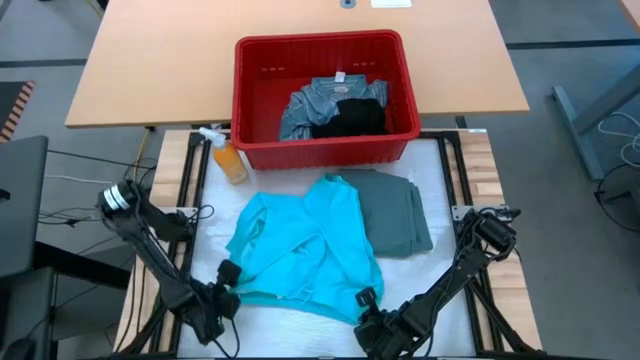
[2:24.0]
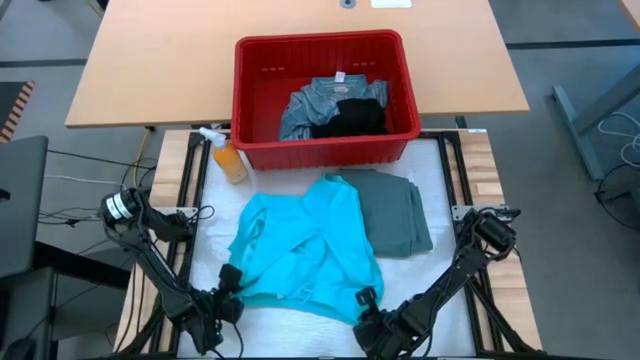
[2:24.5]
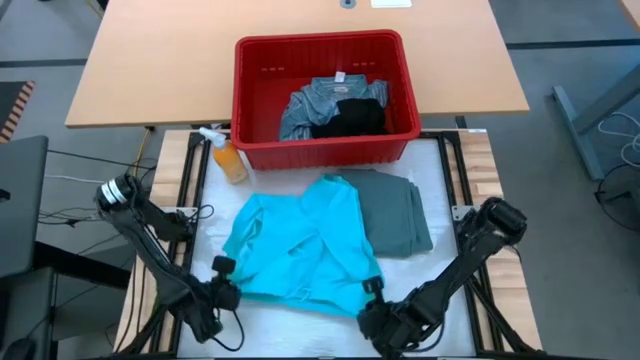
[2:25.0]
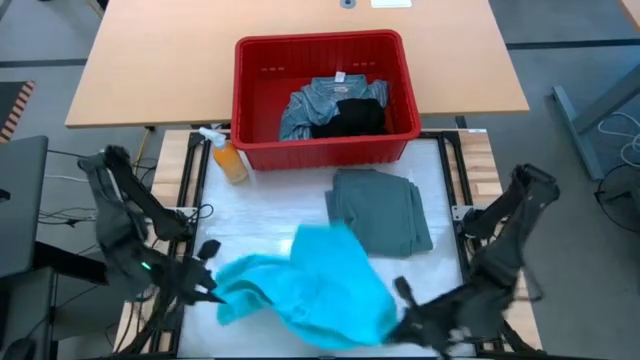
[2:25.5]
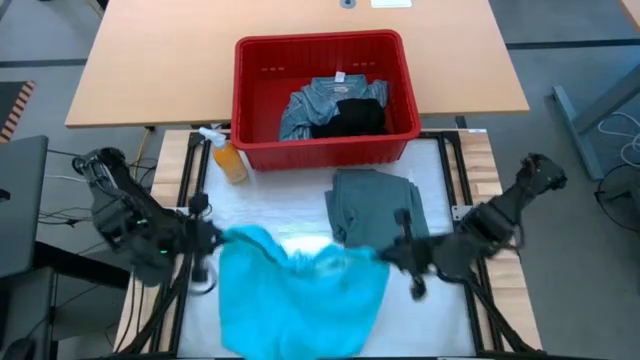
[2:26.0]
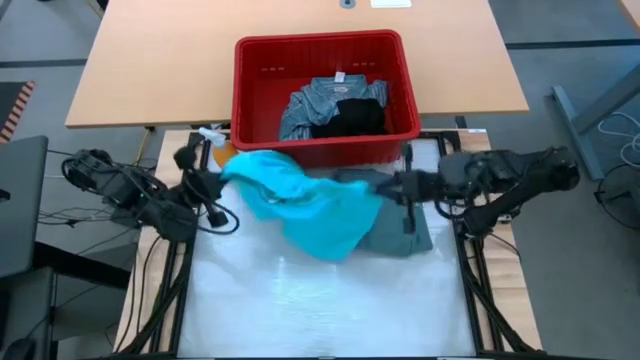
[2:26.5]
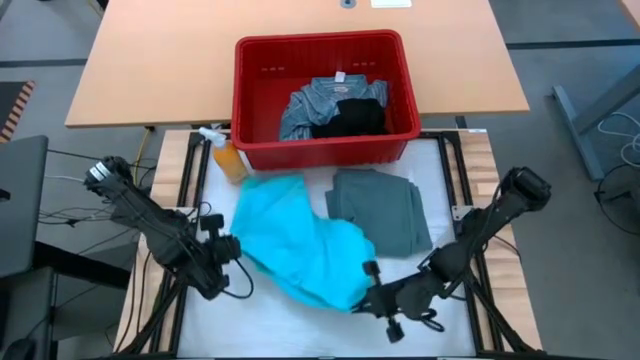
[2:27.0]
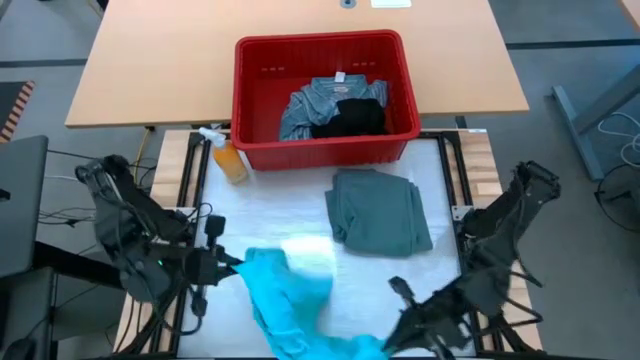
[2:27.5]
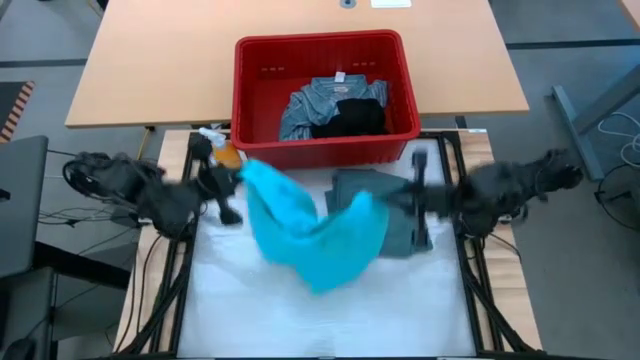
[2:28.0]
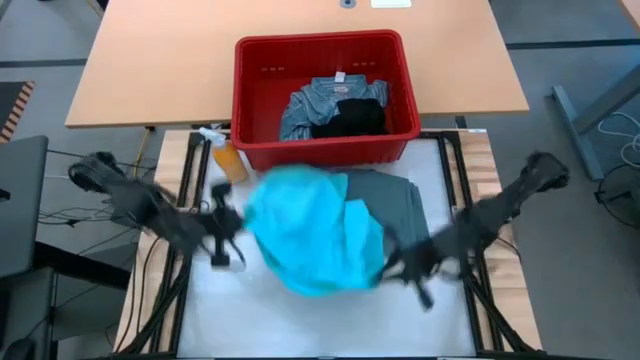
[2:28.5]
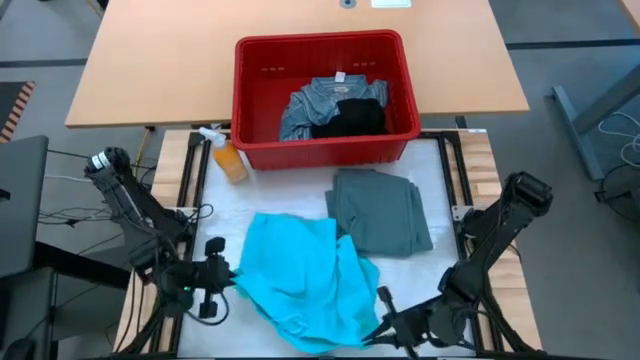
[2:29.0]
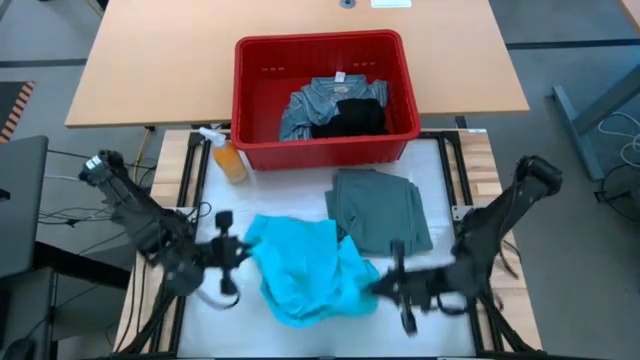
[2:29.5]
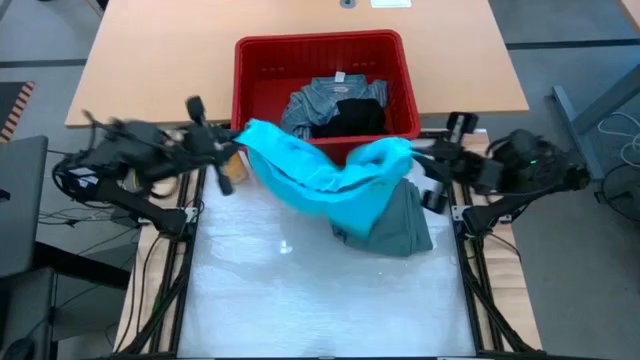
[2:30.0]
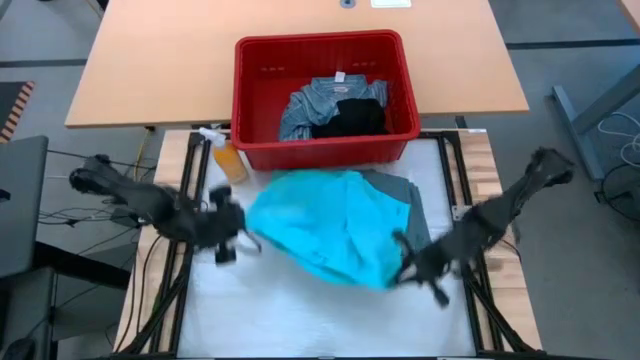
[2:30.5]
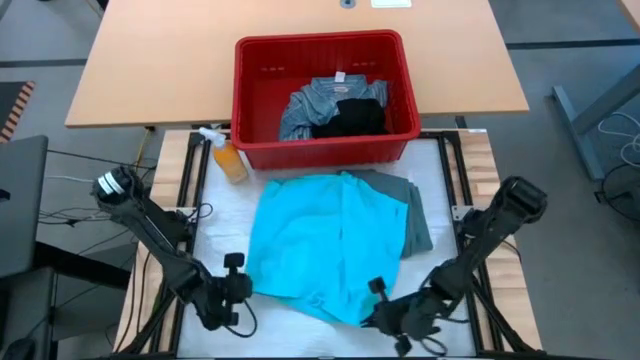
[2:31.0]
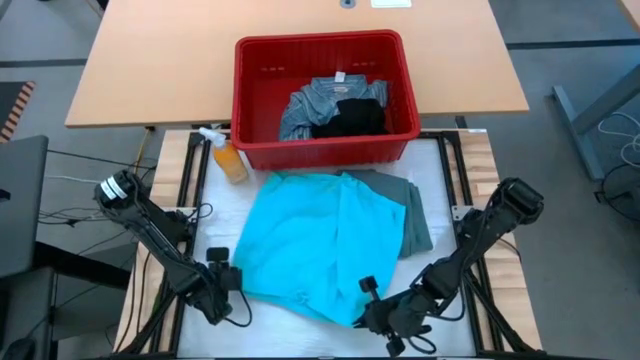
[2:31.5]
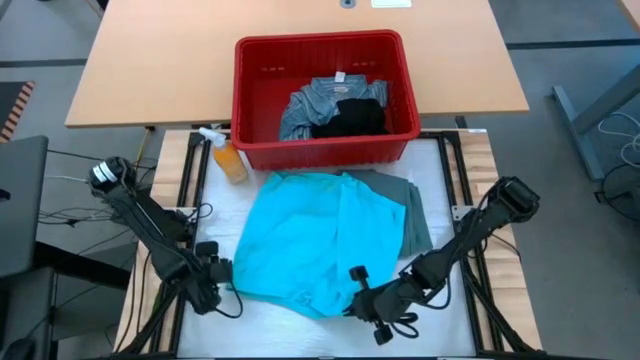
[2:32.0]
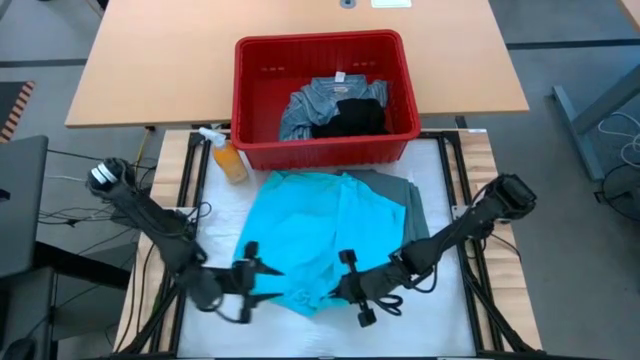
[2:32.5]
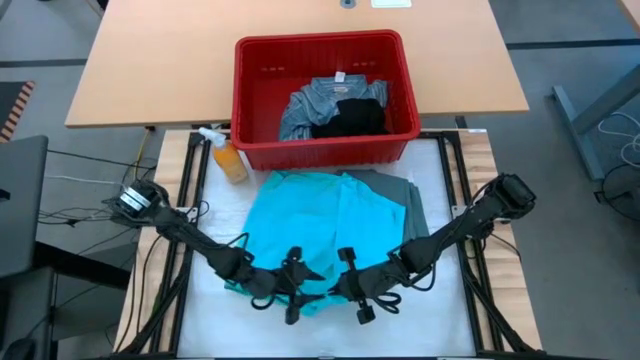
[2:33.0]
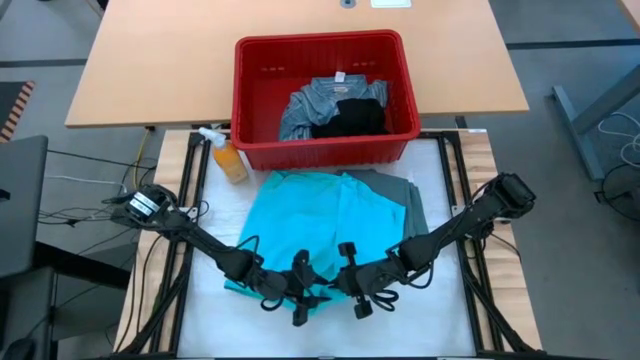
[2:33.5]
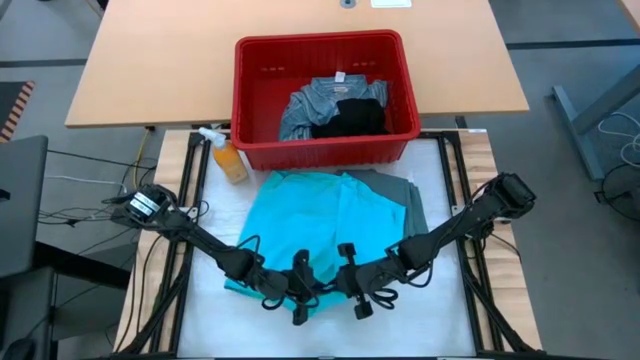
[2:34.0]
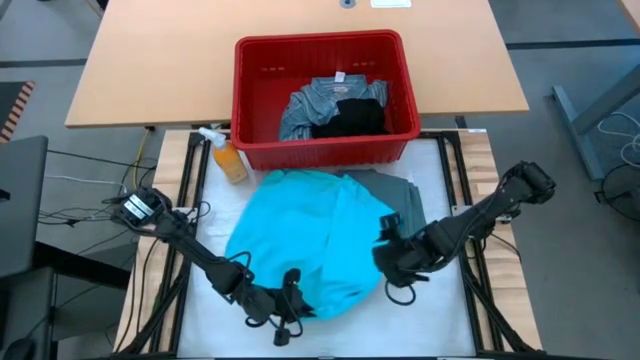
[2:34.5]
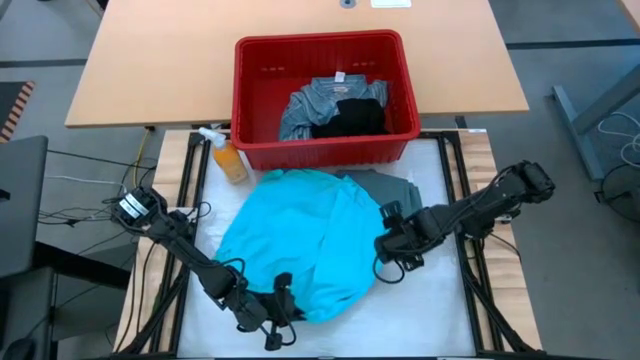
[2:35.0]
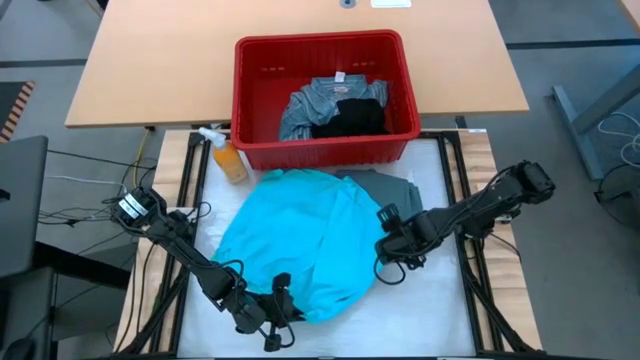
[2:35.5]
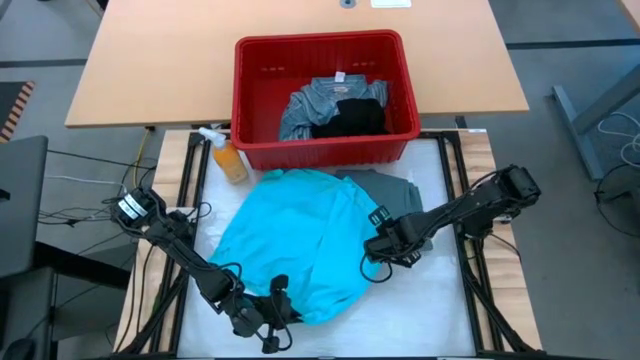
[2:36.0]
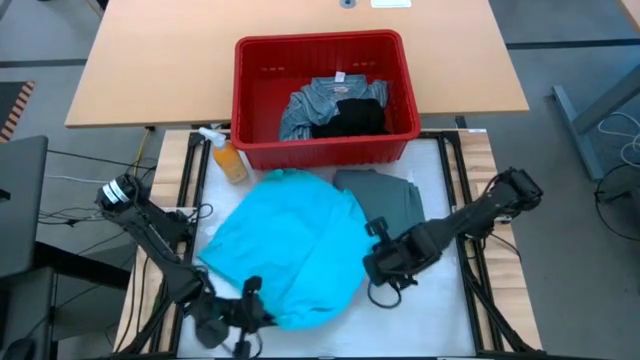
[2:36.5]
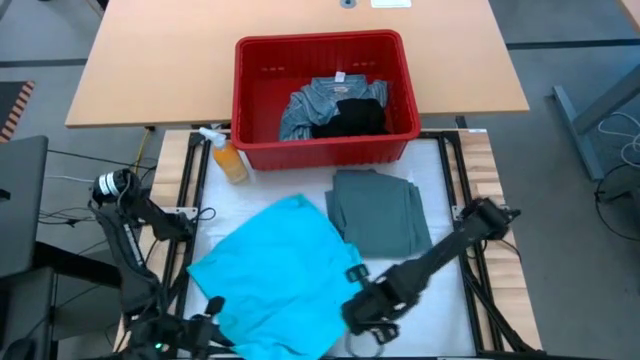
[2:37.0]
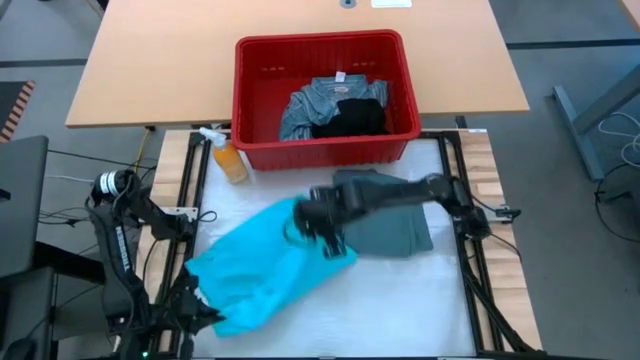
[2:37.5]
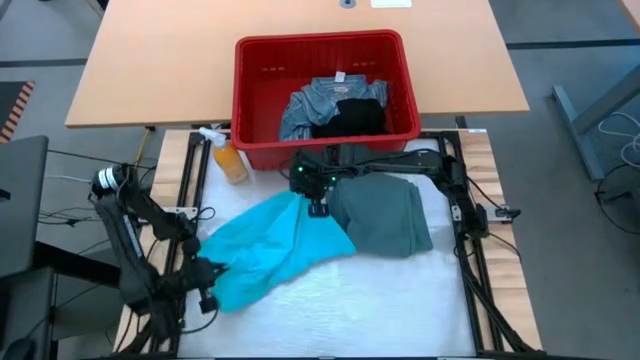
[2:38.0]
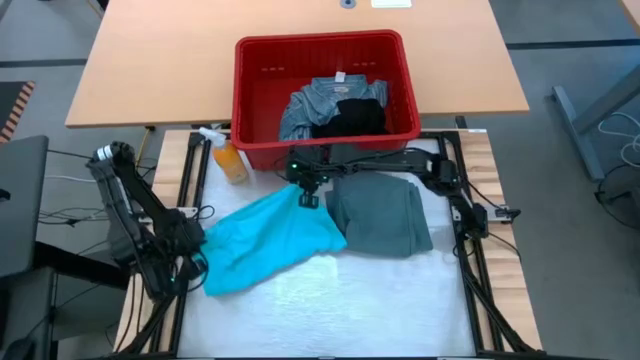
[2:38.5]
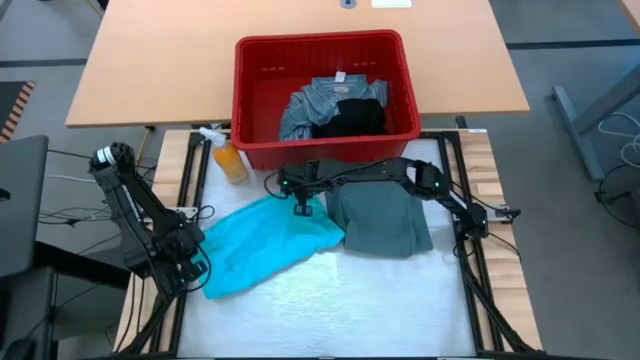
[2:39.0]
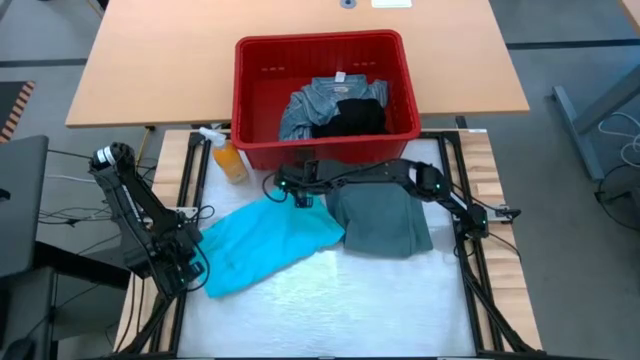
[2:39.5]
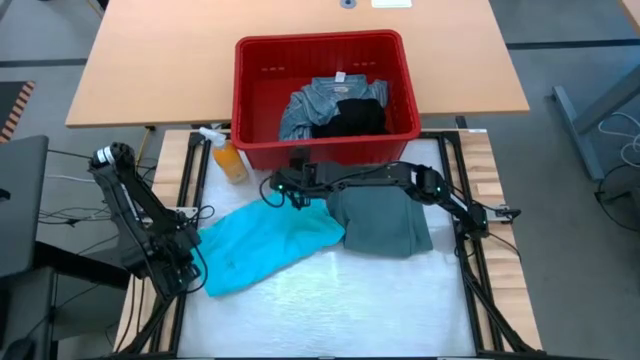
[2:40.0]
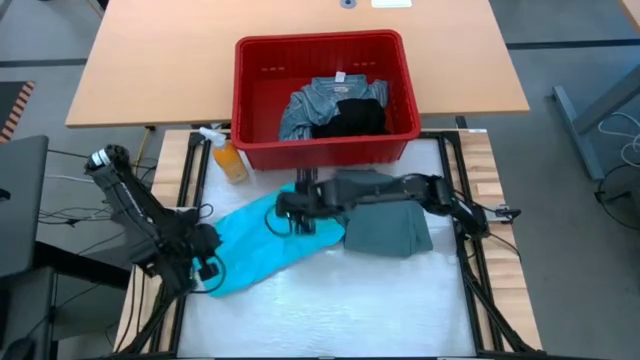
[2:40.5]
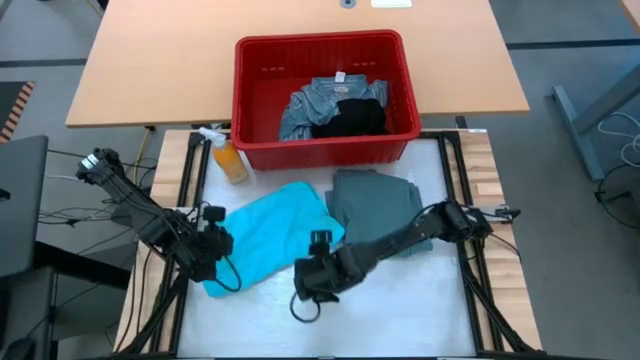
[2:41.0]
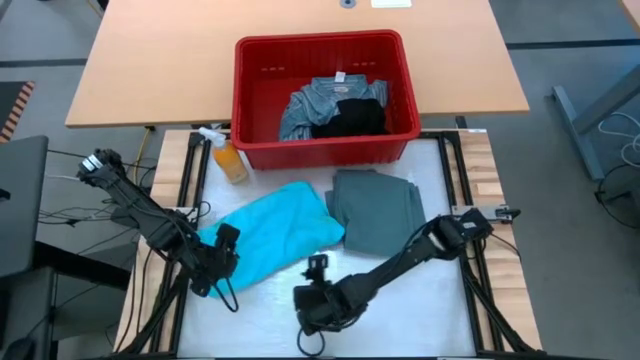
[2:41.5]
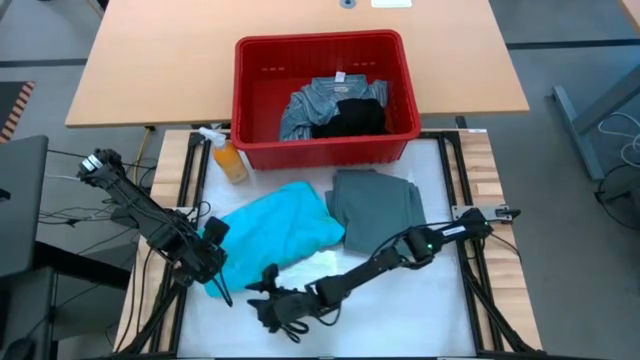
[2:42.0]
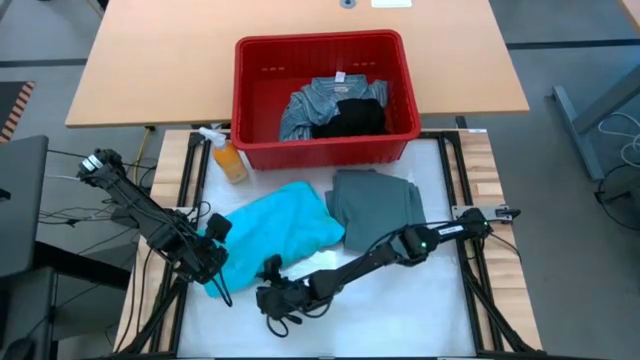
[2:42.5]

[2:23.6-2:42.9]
Task: Fold Laundry from Bin
Fold the light blue shorts

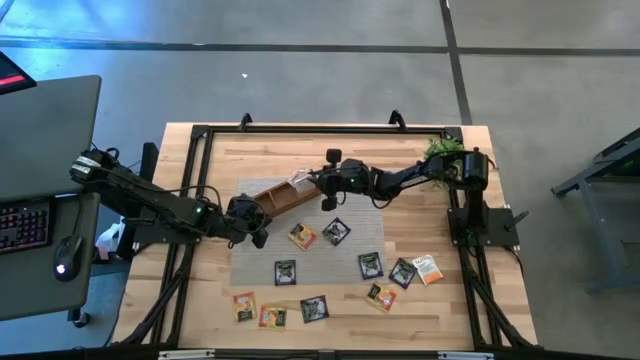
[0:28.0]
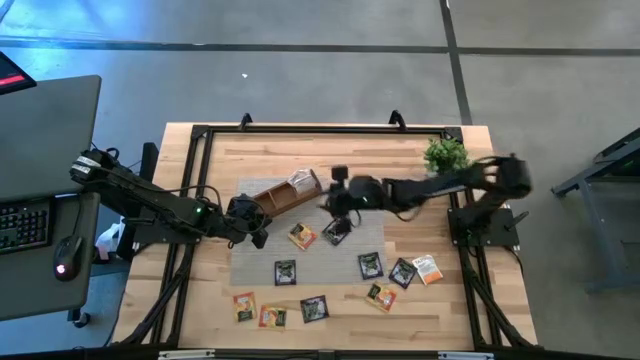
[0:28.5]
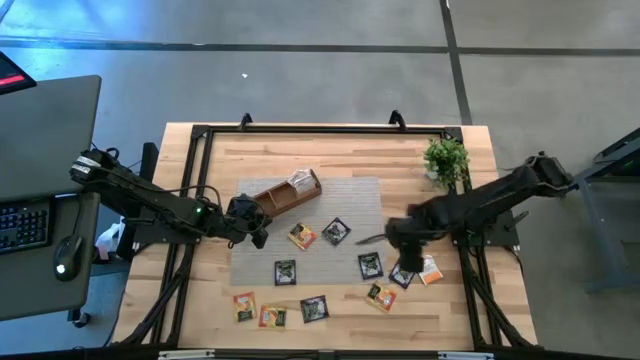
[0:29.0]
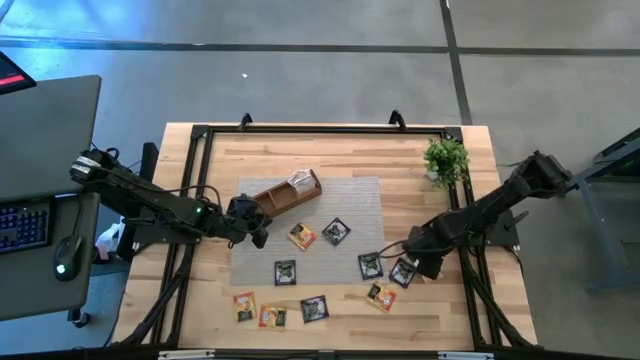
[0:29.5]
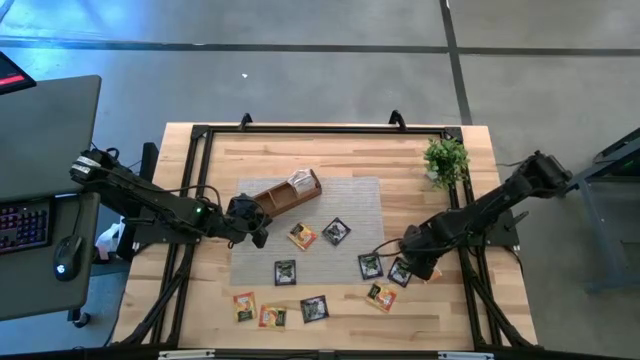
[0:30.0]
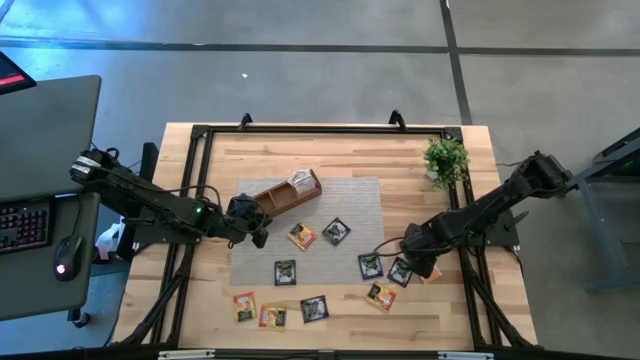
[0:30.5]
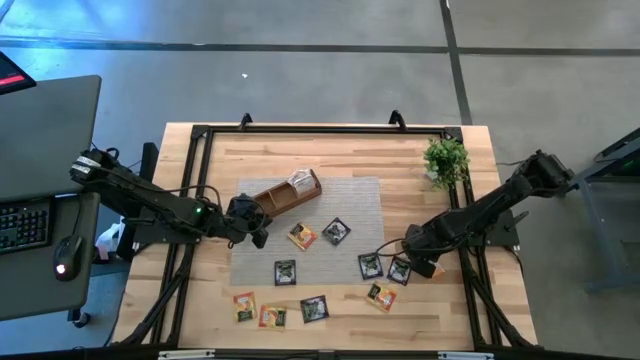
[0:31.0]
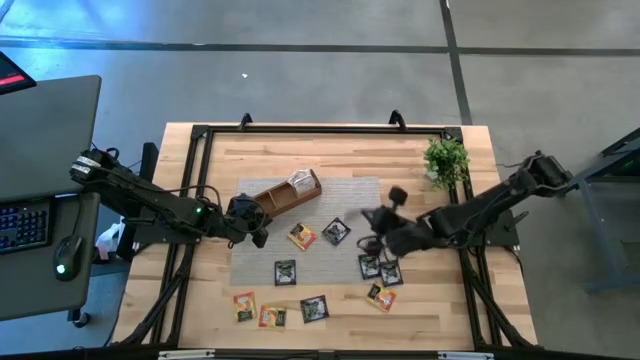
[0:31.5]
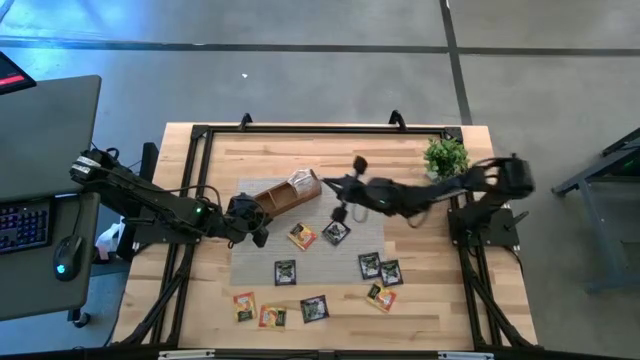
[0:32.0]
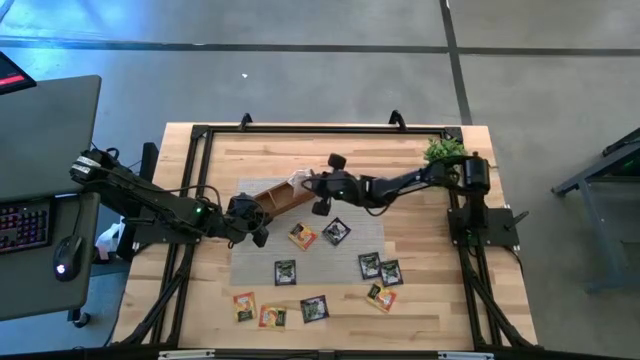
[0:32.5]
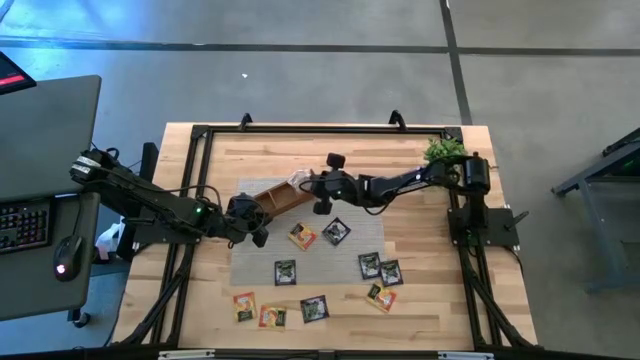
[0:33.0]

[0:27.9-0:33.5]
Task: Pick & Place Tea
Put the orange tea bag into the right section of the wooden organizer
